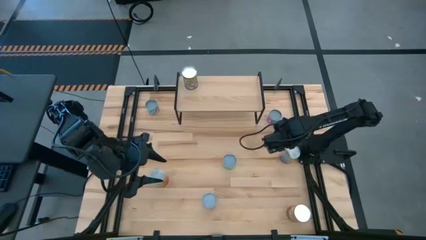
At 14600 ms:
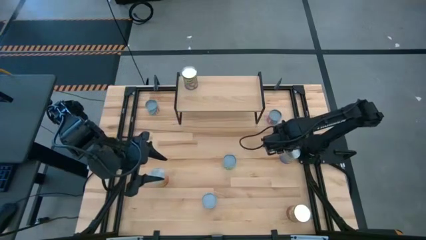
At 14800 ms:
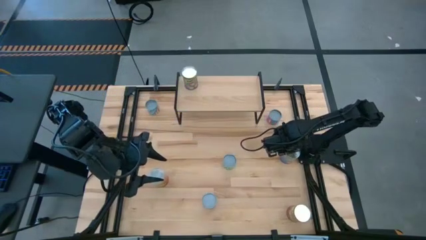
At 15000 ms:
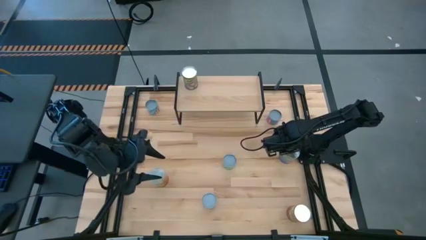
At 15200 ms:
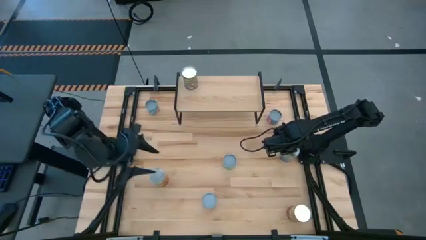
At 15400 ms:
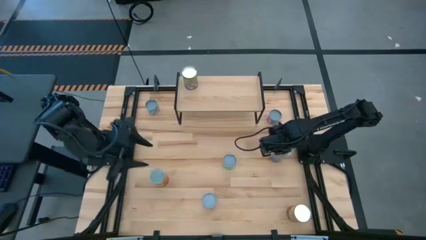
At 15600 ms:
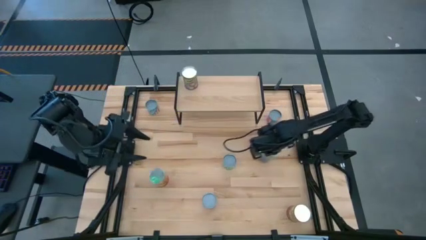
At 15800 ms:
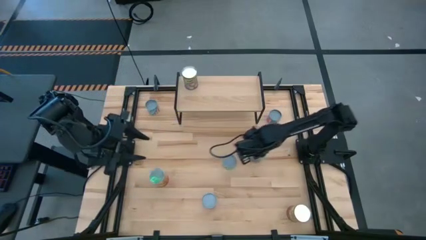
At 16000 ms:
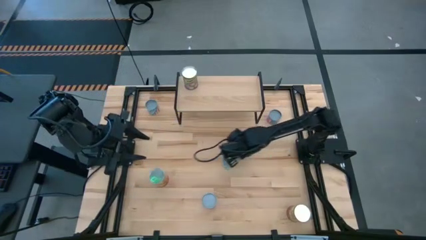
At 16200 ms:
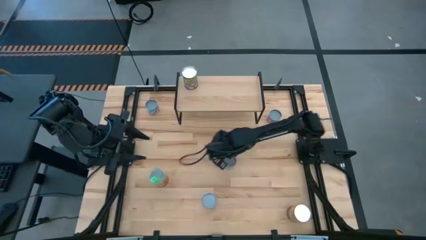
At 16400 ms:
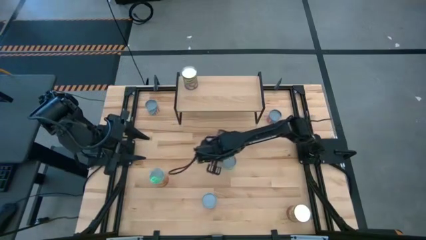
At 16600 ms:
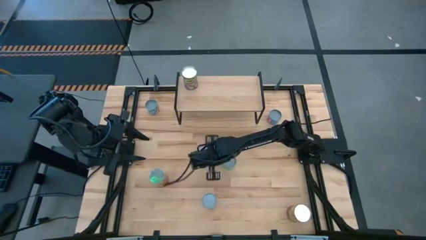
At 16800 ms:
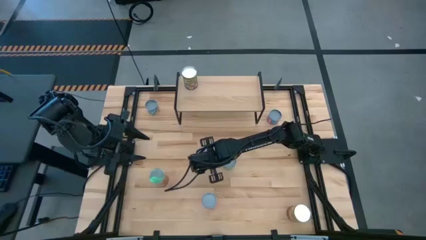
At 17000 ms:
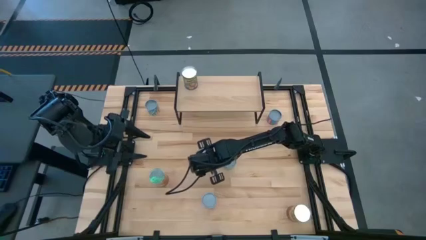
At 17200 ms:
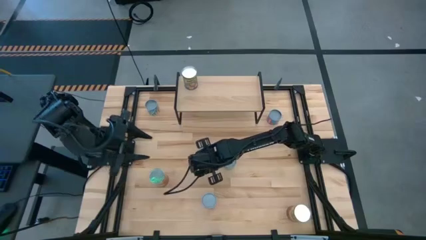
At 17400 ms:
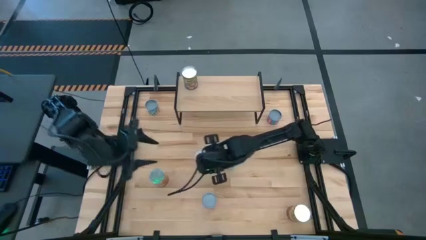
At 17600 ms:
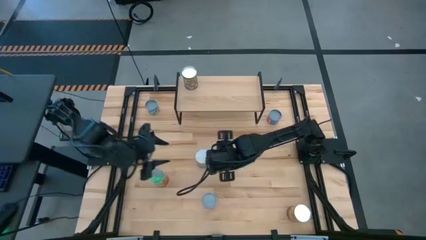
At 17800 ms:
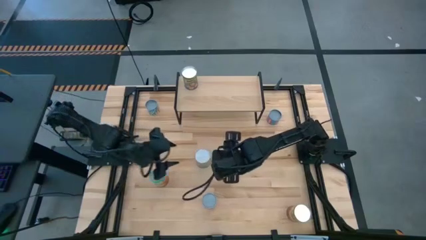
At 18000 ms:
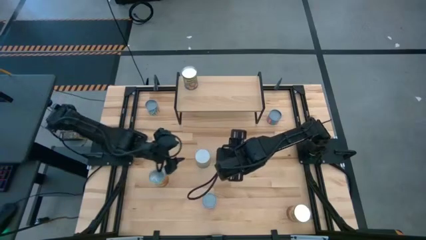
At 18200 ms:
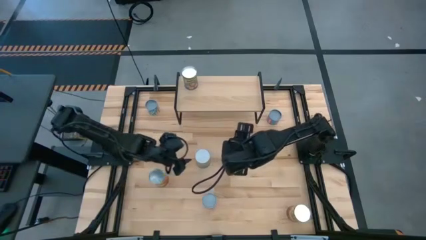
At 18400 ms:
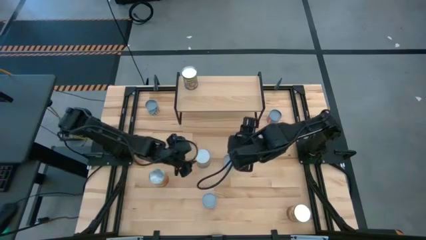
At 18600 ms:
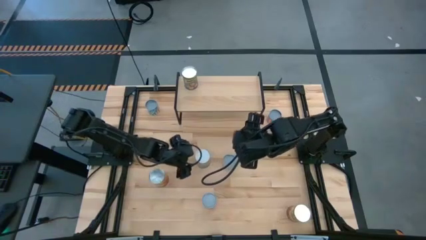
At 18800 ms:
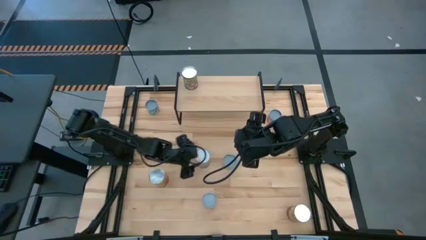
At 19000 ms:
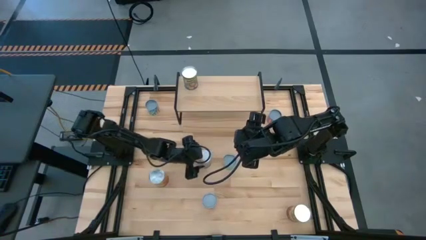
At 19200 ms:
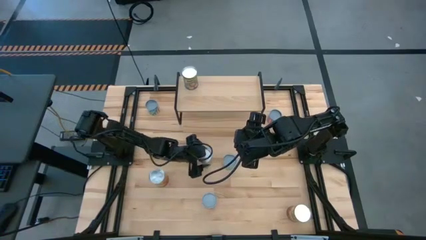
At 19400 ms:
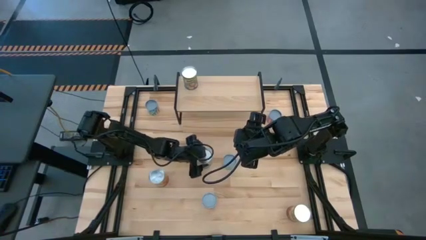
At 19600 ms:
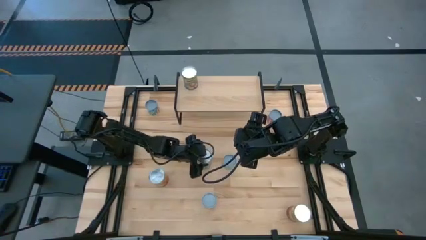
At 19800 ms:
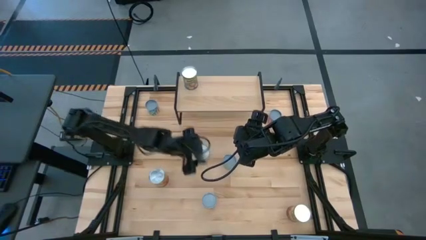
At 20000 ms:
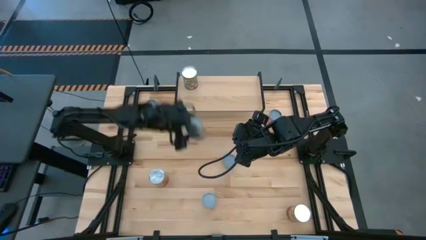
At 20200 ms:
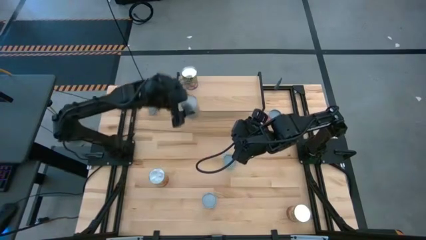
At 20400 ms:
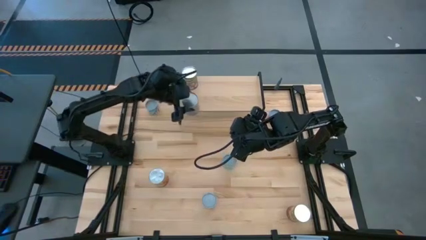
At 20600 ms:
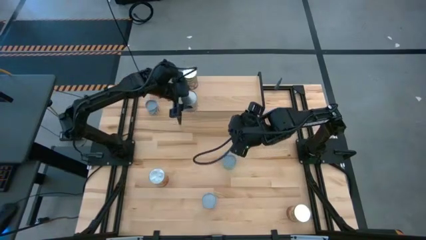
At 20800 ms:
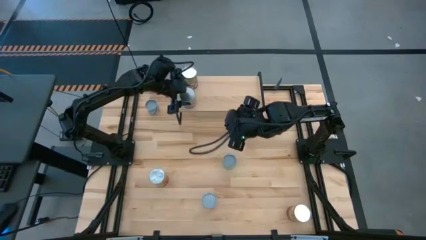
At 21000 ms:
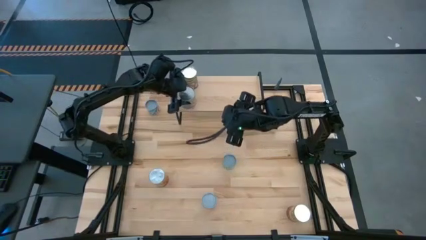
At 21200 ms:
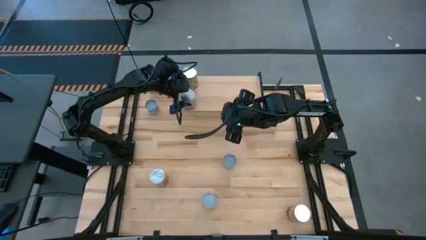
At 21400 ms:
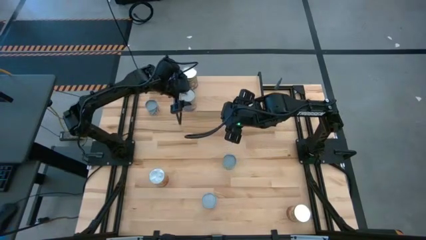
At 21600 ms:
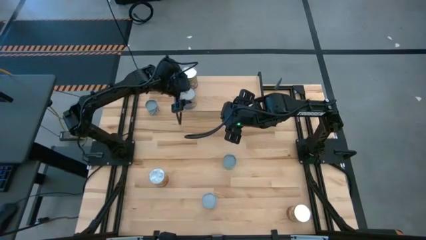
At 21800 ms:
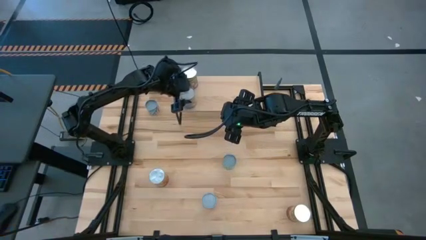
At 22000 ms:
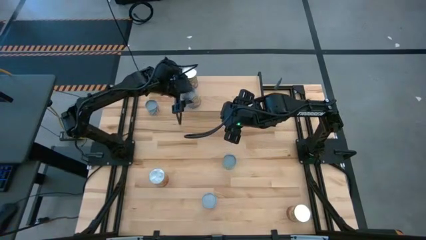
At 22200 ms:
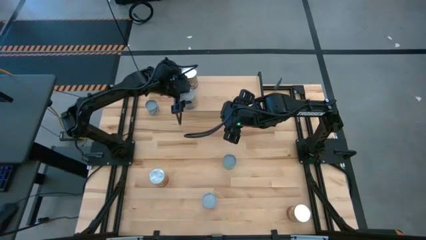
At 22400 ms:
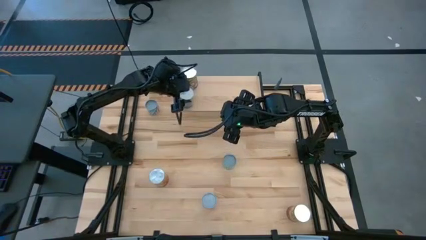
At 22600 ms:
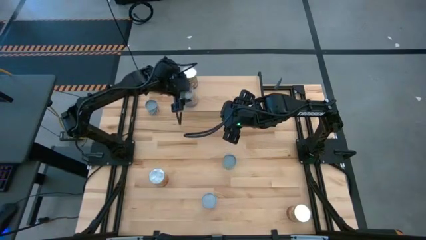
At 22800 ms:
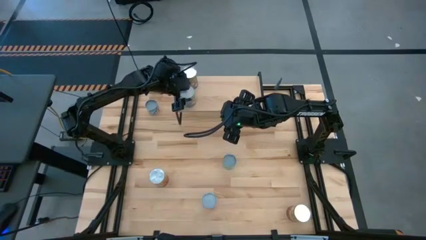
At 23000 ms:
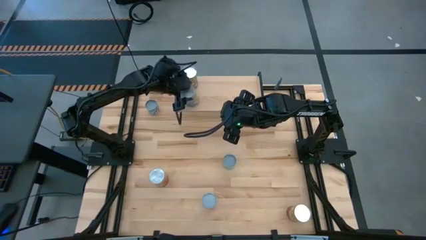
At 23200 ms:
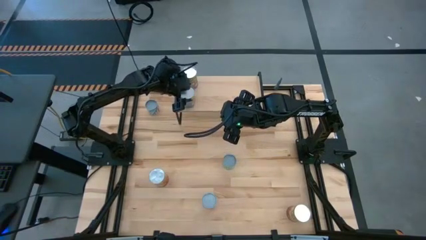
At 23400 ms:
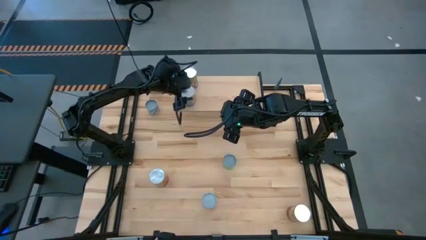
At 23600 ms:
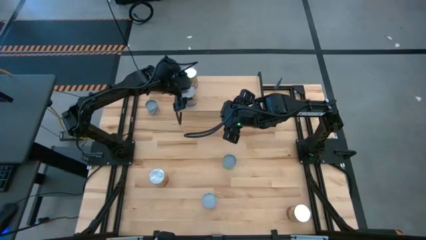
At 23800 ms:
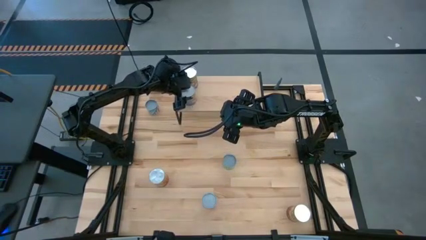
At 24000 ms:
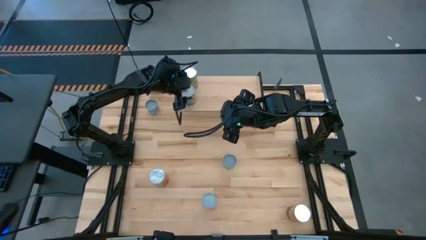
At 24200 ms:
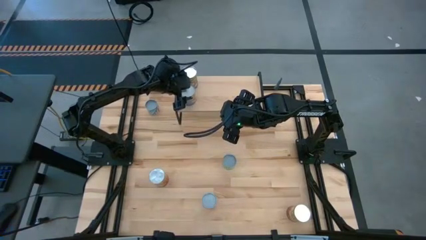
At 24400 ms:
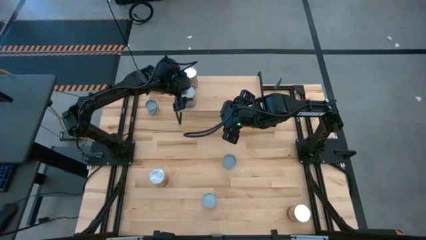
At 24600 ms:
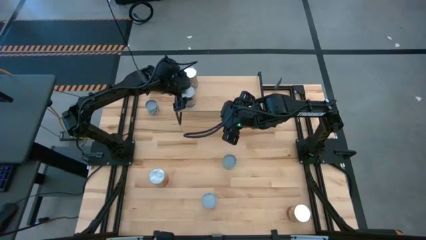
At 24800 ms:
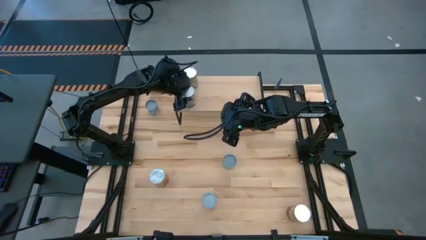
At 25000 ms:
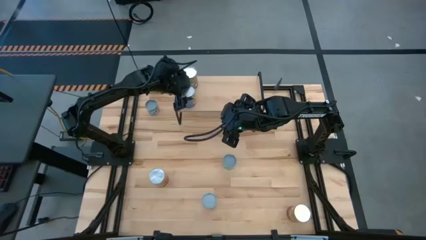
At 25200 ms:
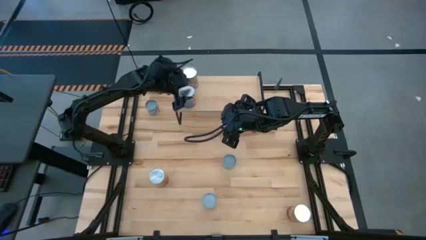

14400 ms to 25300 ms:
Task: Pick and place cans onto a shelf
Put the top right peach can on top of the shelf

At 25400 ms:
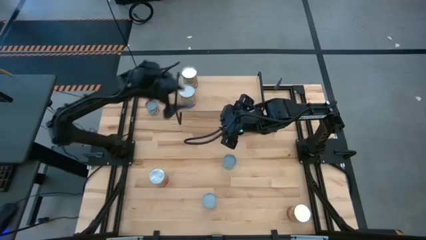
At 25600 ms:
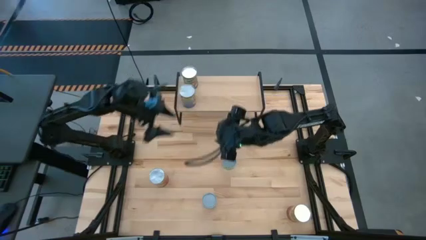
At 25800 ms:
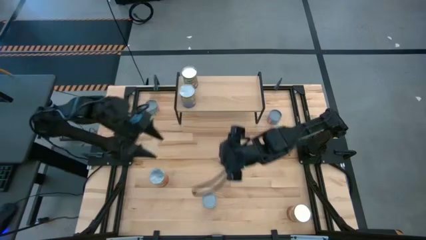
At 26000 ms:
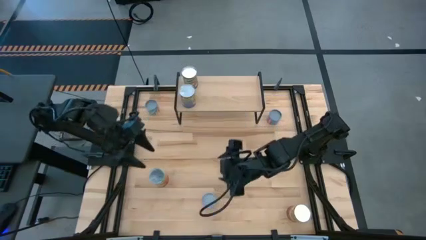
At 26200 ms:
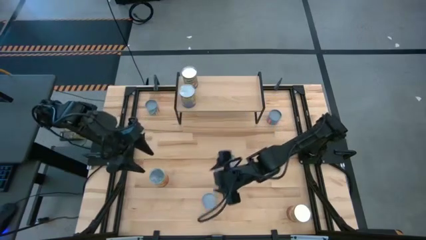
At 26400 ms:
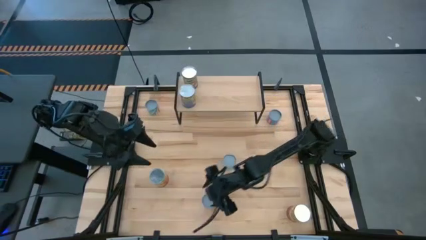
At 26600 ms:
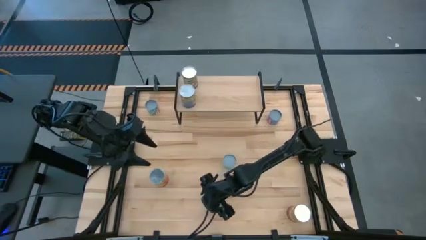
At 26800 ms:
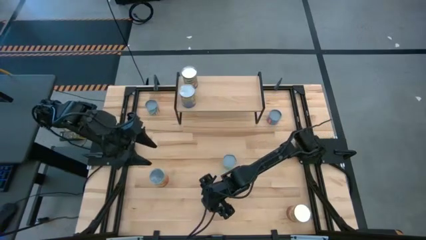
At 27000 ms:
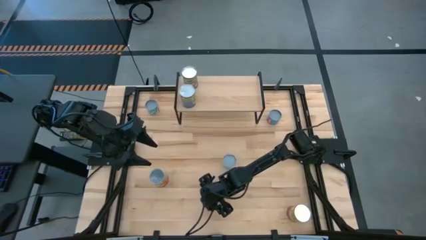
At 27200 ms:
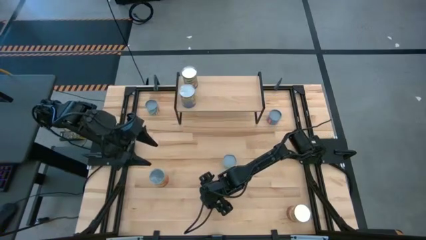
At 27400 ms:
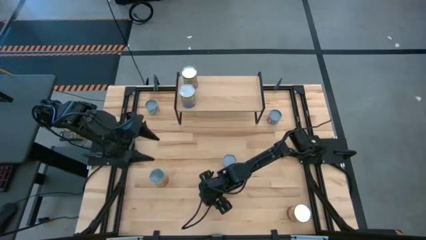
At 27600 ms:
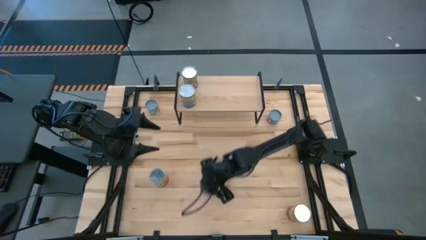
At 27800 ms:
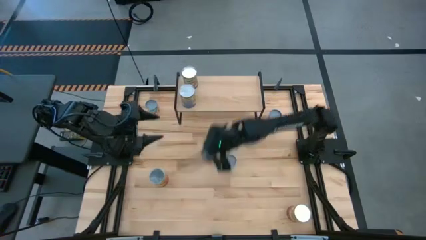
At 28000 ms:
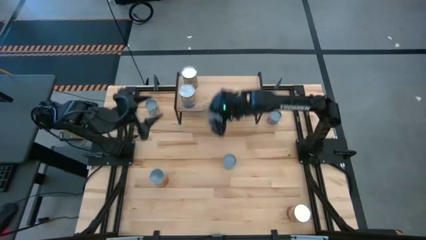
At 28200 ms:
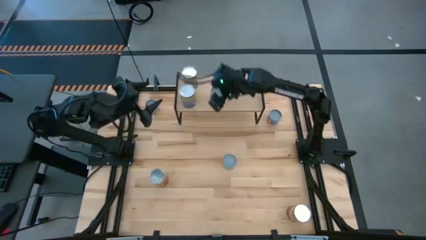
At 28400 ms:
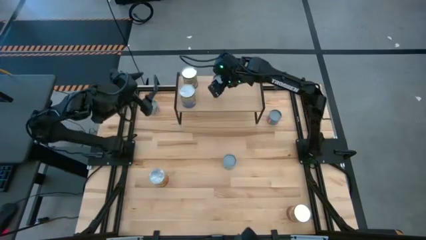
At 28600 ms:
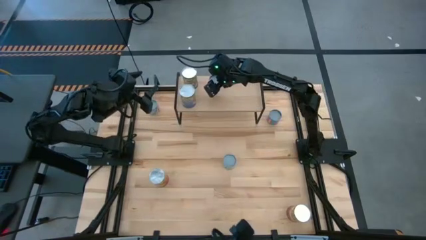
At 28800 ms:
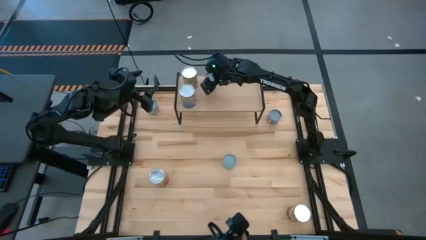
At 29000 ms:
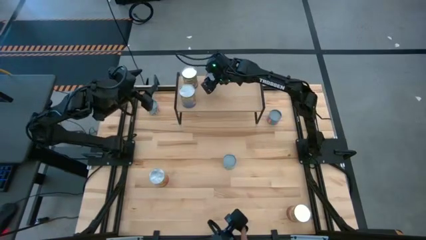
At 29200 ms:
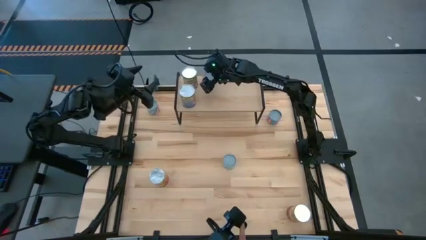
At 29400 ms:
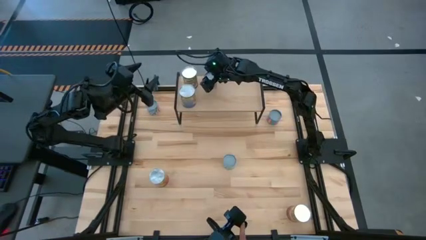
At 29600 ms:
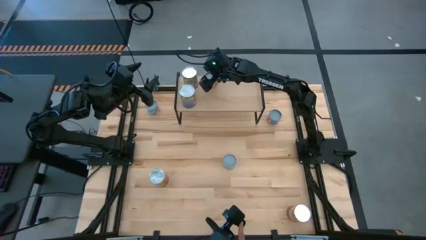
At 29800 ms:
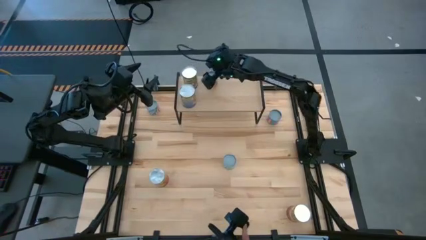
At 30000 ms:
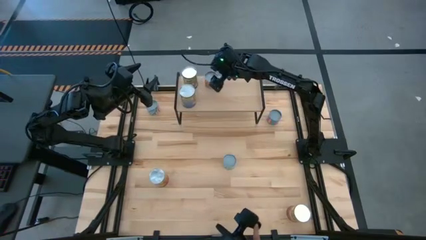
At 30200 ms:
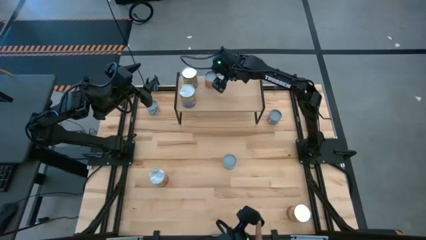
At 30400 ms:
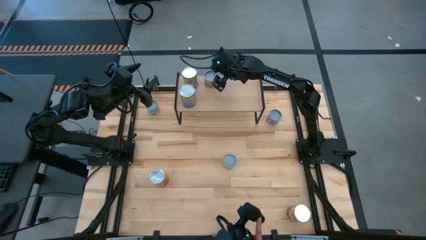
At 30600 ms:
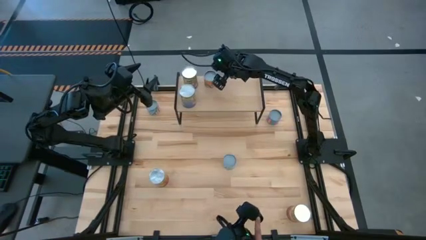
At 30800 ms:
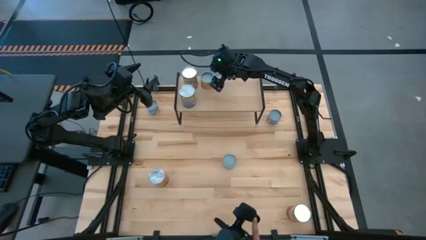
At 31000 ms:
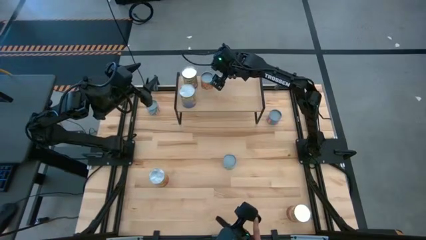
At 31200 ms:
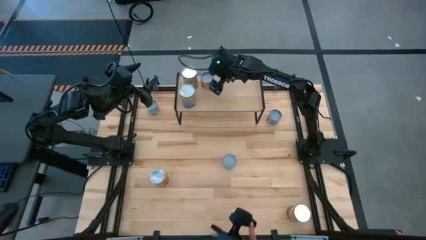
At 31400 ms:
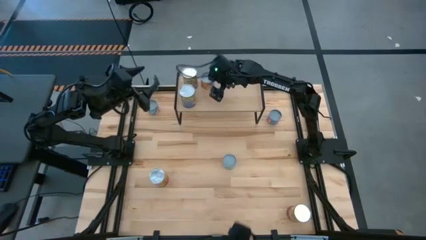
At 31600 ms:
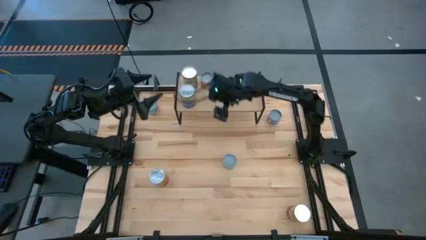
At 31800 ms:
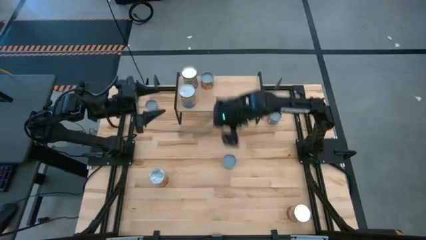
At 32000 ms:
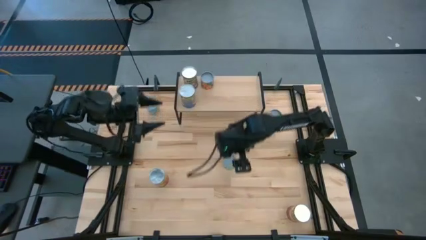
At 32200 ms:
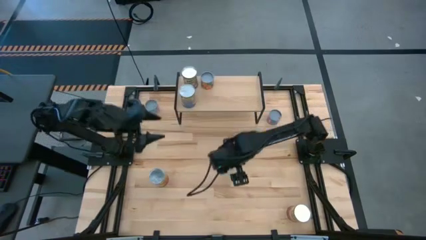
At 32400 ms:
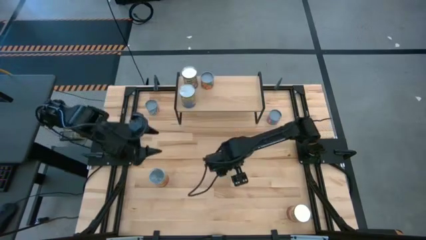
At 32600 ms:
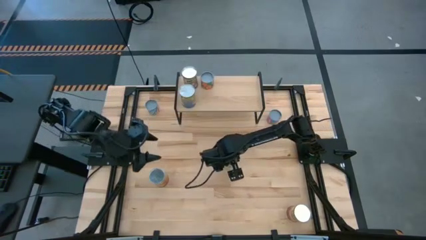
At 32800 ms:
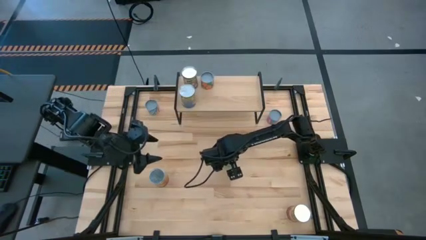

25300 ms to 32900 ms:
Put the bottom center orange can on top of the shelf
